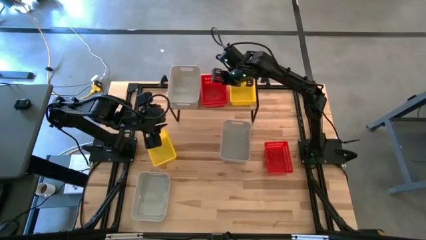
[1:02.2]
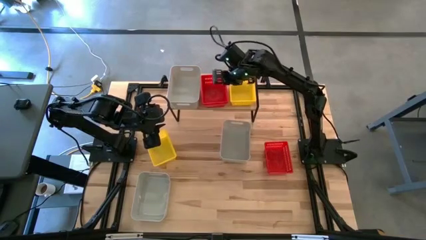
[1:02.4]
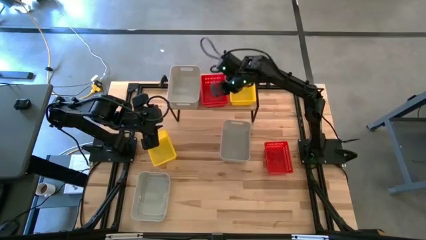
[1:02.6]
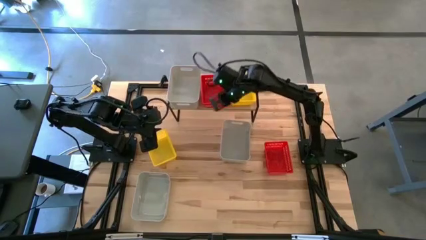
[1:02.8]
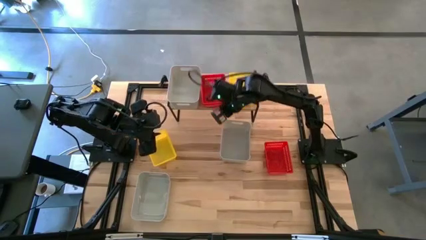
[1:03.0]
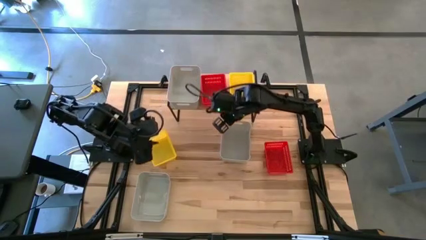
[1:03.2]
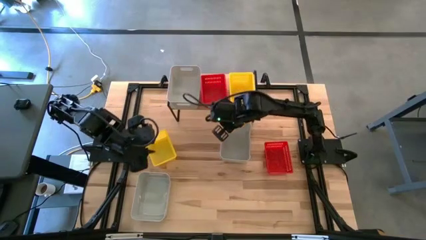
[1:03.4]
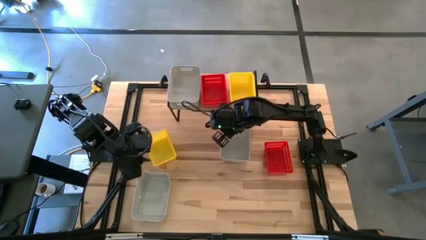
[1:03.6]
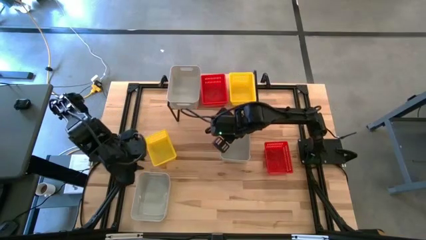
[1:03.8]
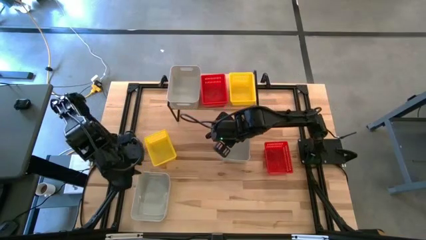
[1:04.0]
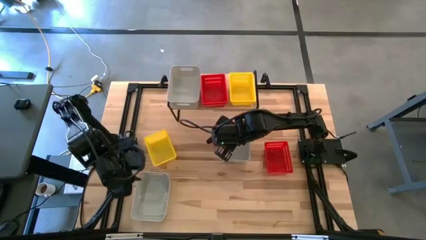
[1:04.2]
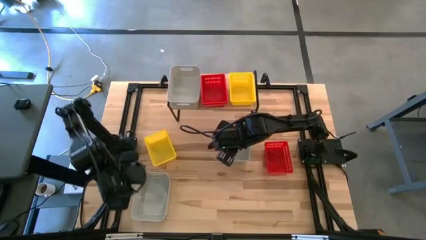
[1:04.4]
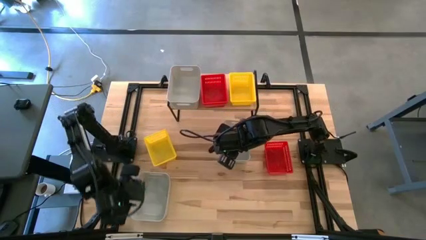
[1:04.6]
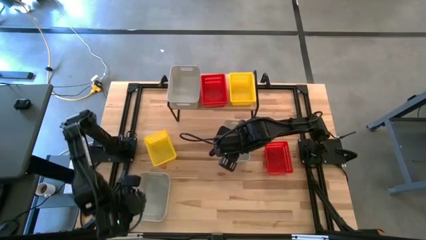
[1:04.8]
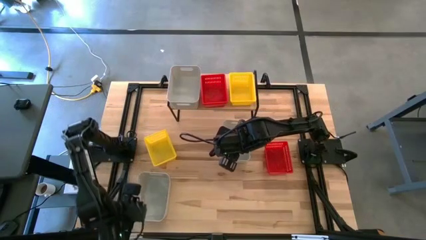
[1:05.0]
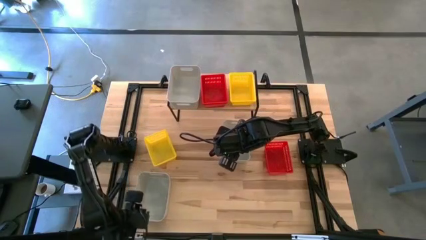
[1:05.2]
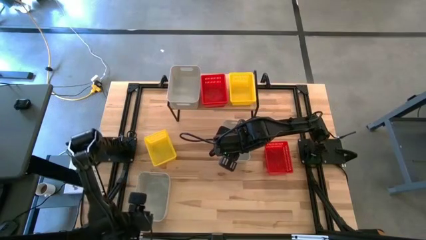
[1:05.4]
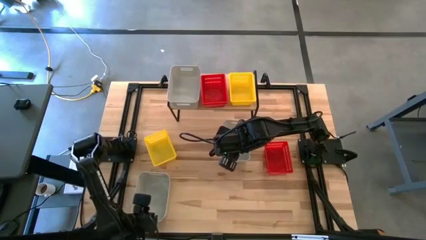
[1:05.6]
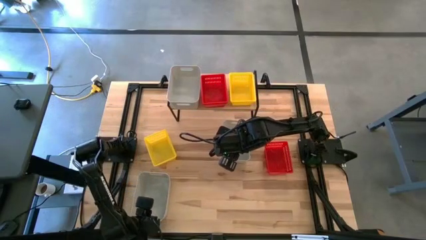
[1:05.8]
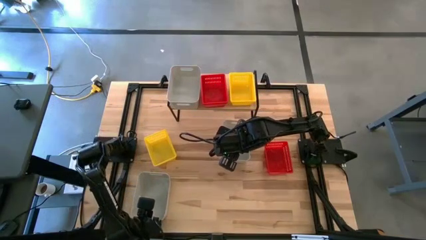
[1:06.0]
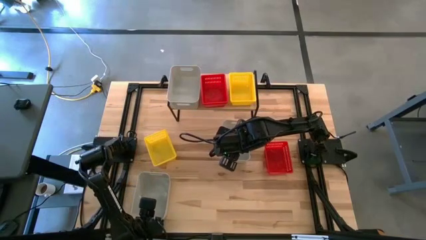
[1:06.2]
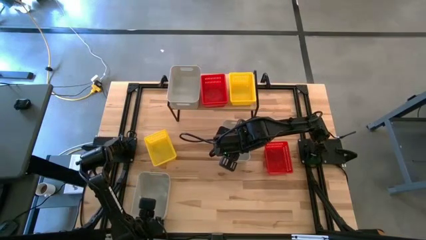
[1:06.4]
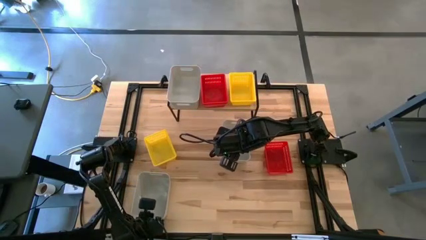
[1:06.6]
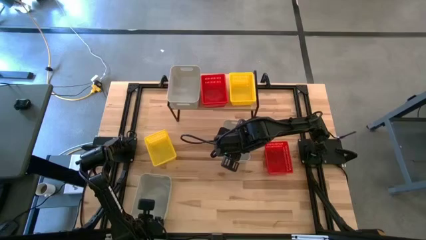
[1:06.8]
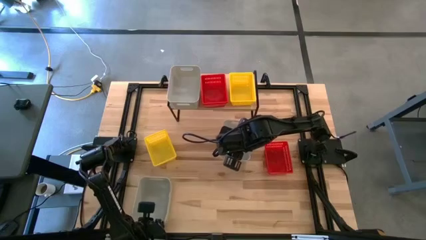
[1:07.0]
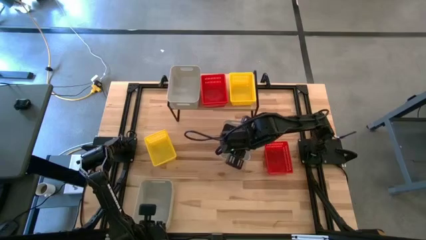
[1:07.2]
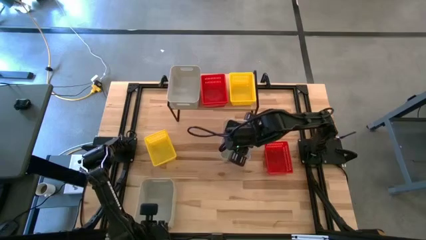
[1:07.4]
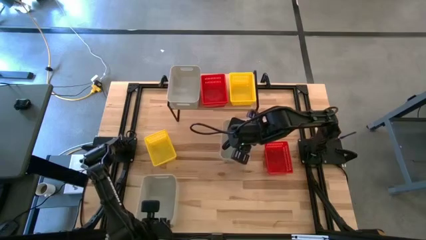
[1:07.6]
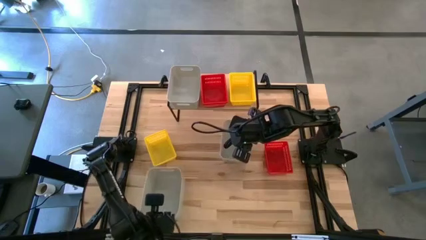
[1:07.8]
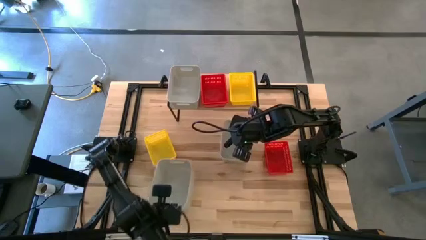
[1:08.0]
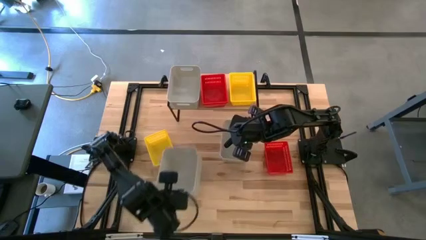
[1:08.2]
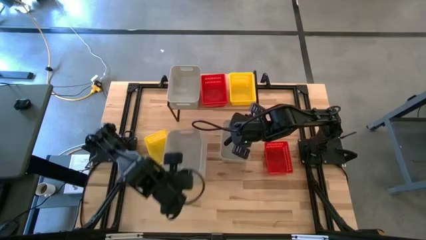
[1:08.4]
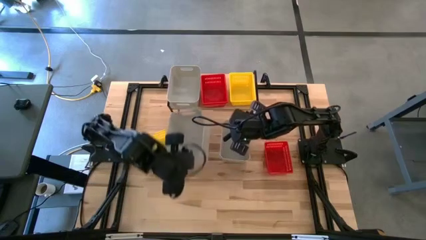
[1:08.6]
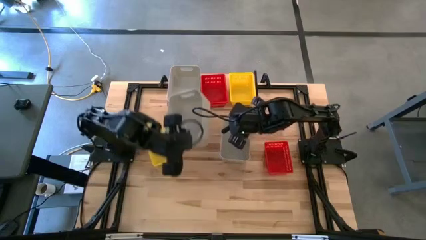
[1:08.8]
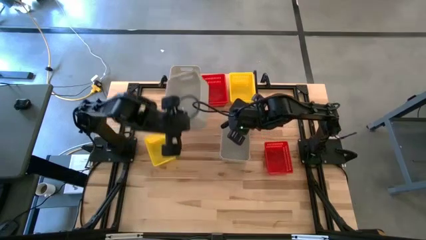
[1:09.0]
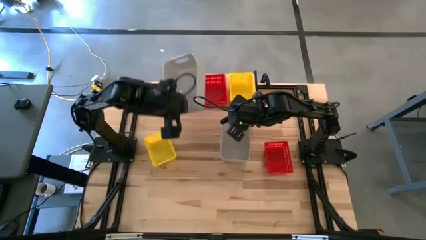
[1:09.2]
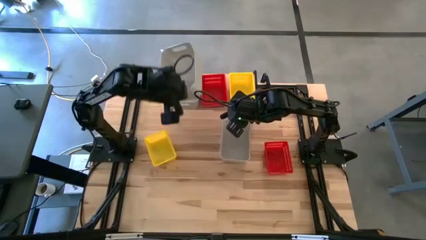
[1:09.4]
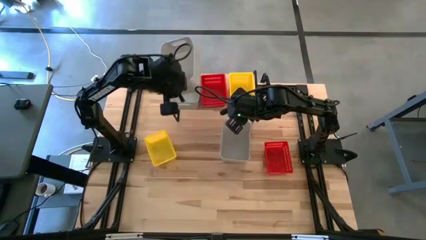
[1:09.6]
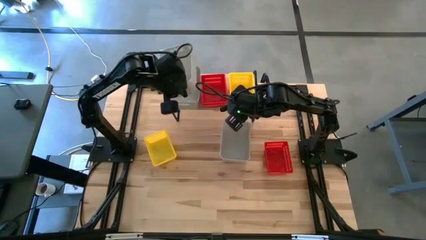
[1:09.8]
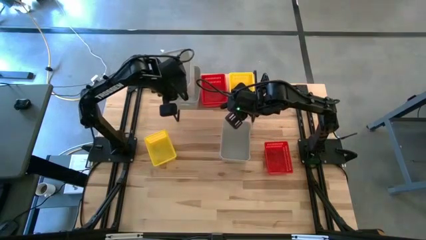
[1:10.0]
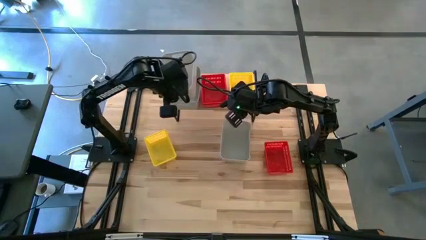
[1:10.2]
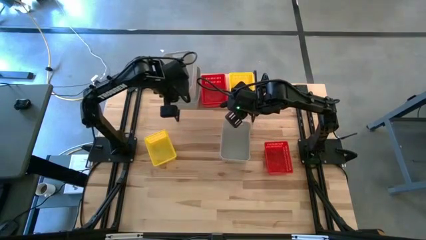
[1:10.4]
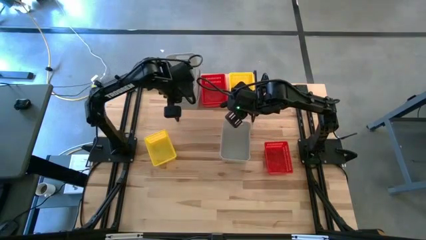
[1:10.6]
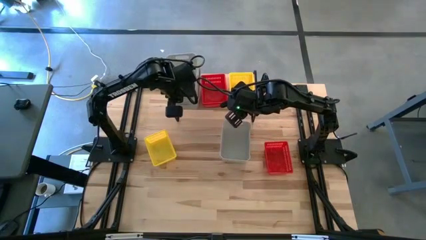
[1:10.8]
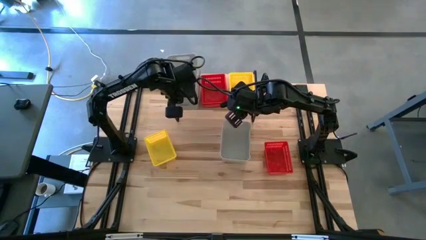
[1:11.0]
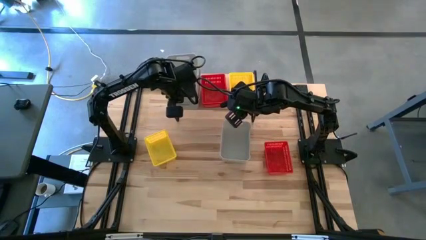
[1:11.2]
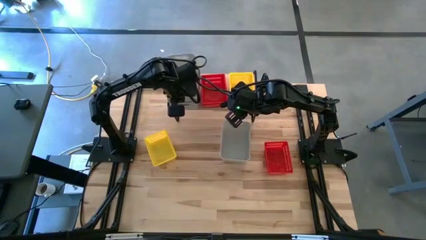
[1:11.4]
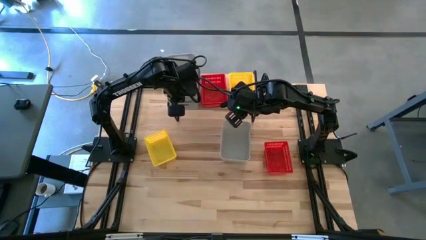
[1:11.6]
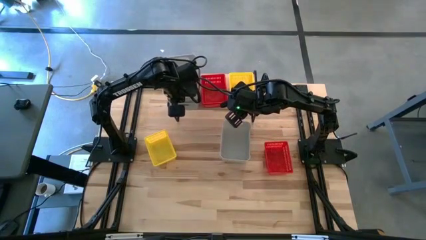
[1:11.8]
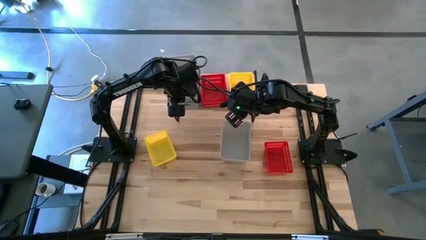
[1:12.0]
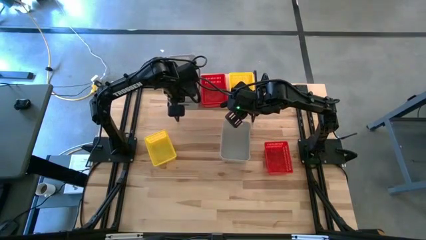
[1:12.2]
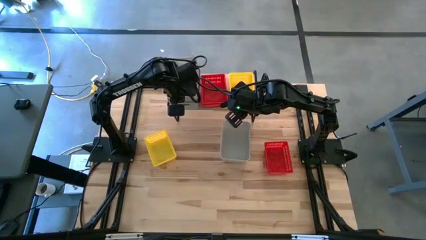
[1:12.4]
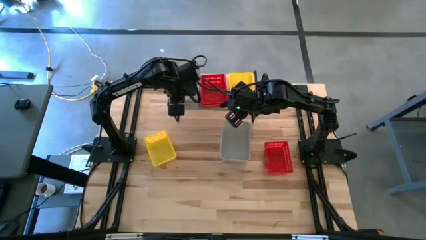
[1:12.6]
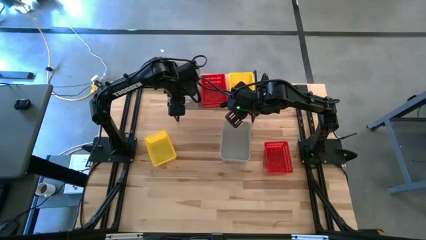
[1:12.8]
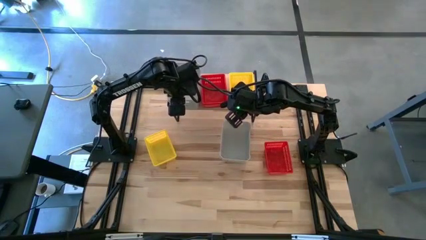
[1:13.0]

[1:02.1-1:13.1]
Task: Stack baskets on shelf by color
Stack the bottom gray bin on top of the gray bin on the shelf

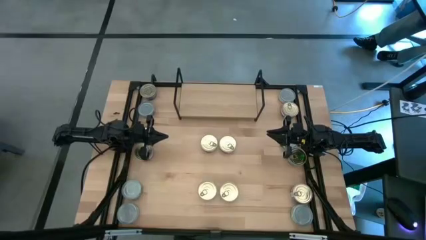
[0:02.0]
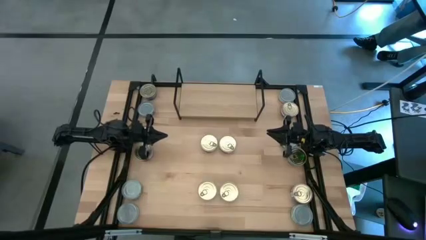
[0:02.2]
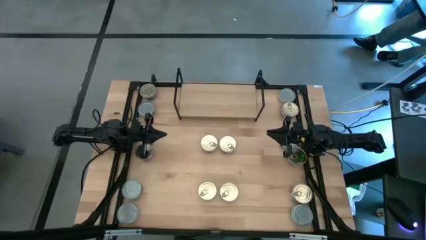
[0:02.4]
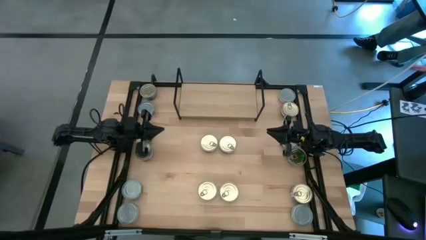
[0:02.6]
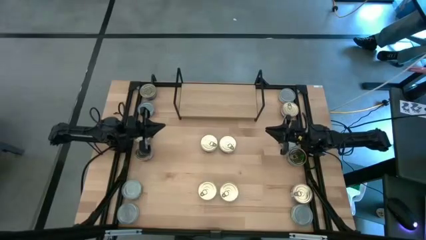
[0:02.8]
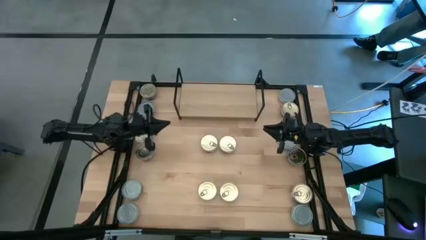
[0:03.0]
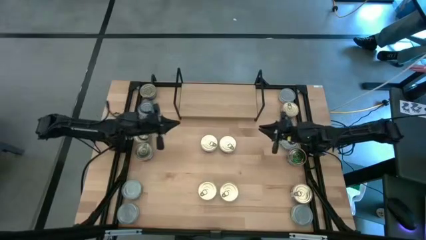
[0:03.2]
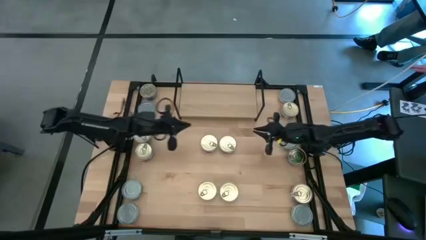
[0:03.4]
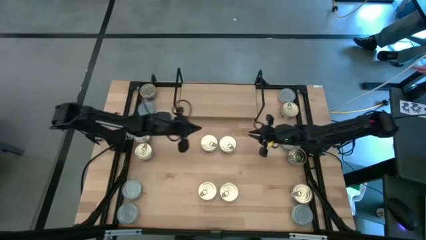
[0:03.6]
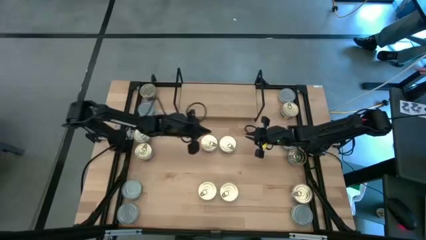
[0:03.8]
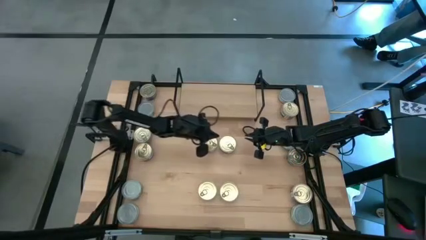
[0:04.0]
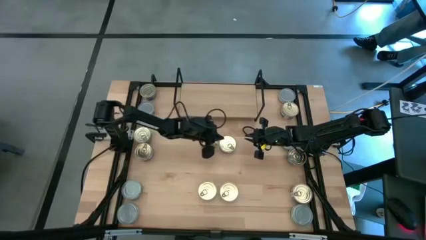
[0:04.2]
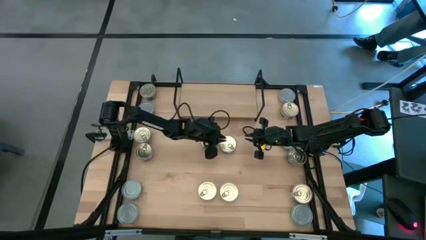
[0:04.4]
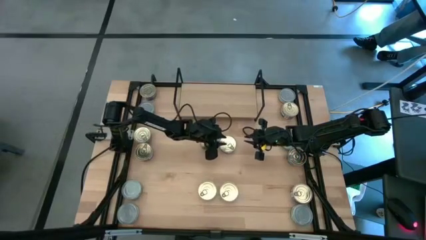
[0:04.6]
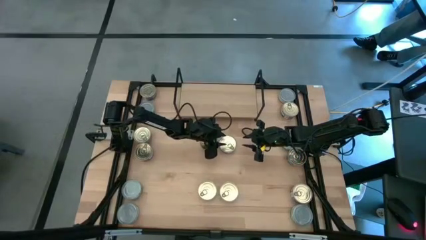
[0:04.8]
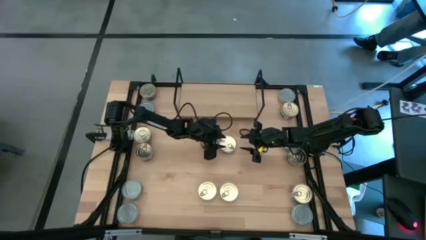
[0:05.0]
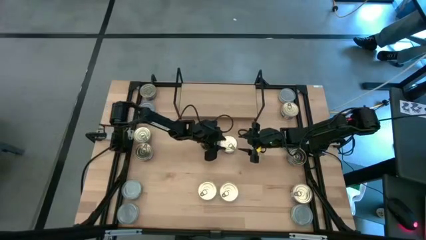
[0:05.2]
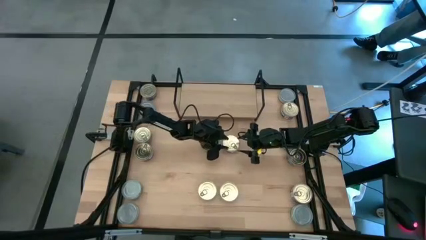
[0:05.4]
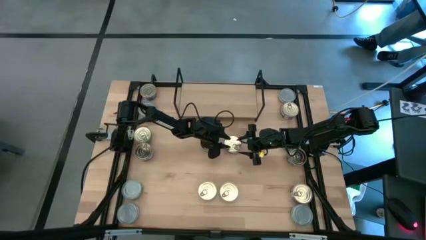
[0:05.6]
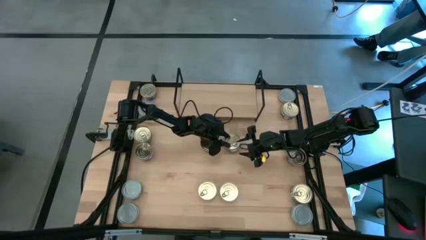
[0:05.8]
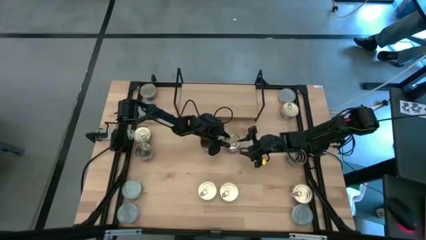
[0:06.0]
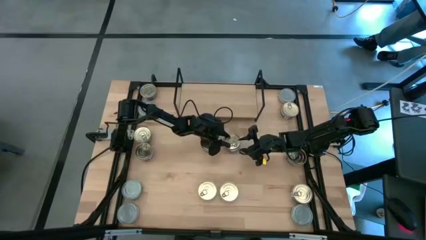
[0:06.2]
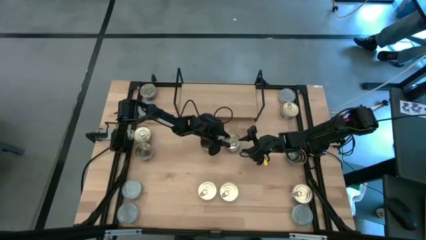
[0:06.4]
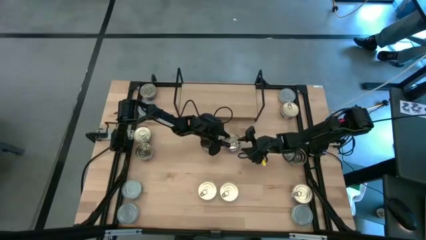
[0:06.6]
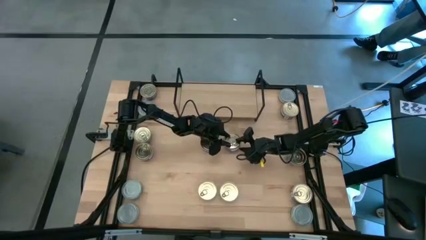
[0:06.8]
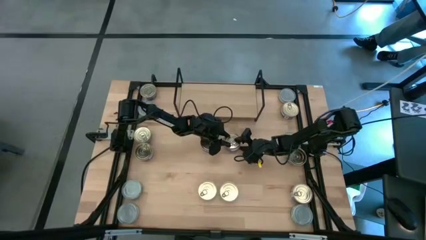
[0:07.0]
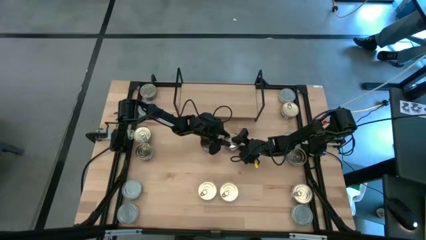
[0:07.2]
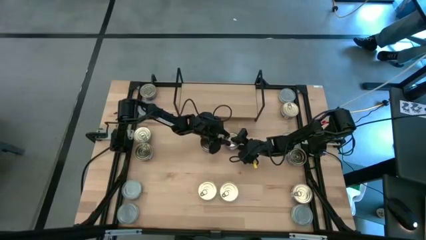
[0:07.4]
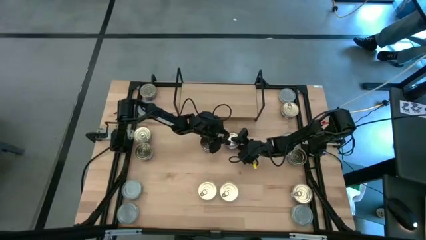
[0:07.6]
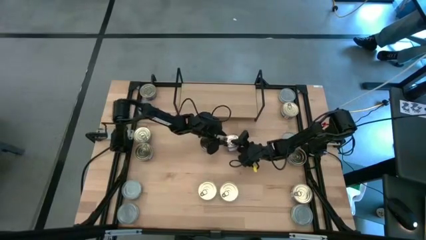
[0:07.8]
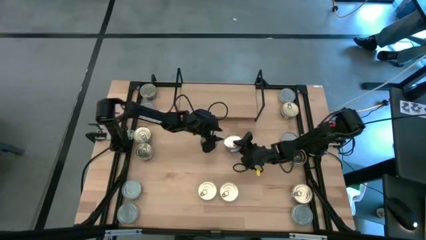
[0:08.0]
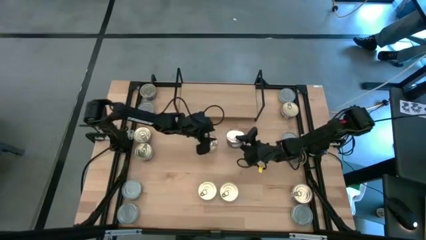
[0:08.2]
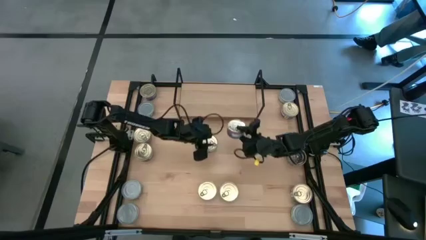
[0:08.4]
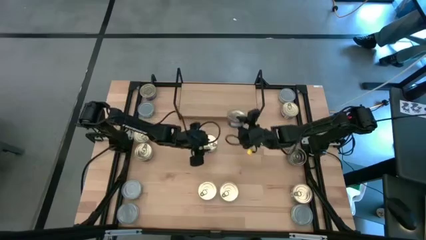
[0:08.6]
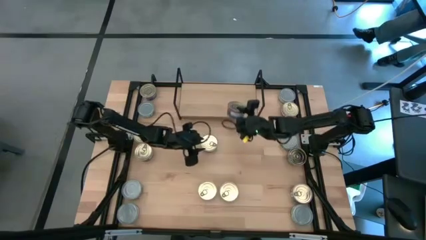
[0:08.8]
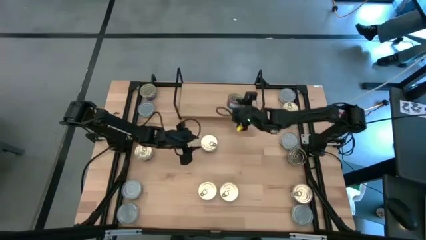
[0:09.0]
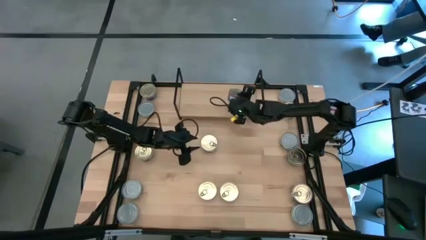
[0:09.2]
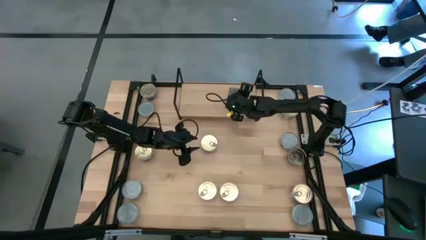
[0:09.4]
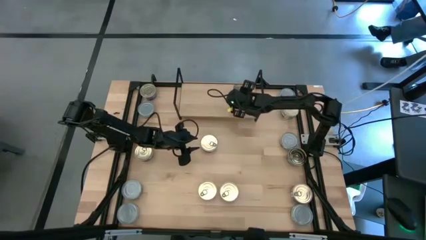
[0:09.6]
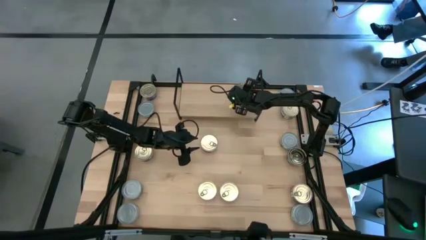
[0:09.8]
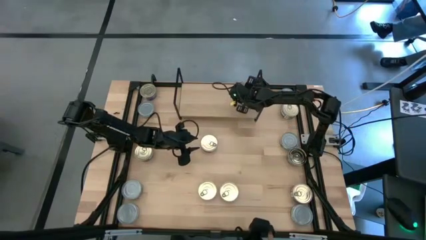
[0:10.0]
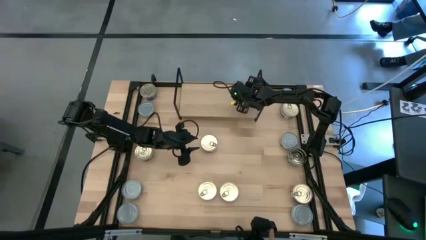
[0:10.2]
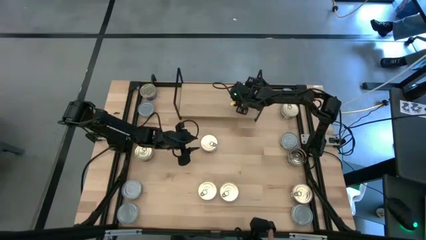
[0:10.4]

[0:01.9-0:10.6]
Task: Stack canned seafood by type on shelf
Put the blue and pink tuna can on the shelf
